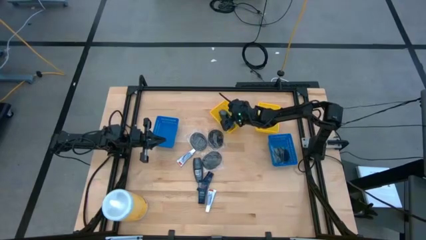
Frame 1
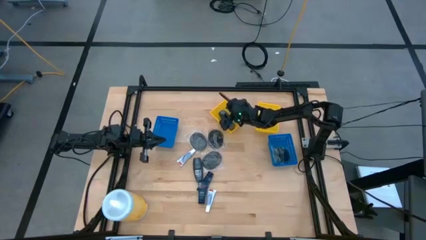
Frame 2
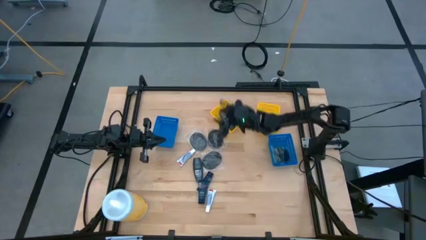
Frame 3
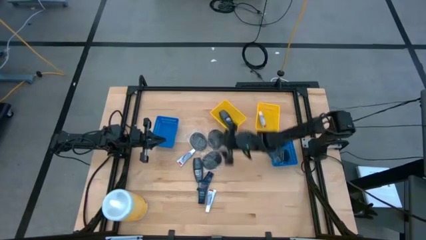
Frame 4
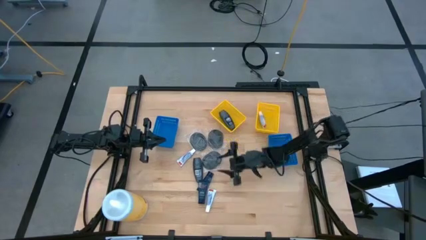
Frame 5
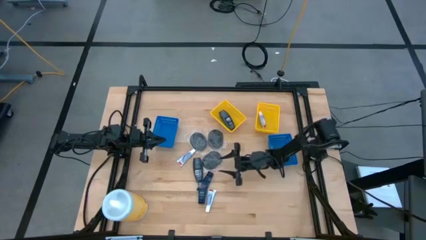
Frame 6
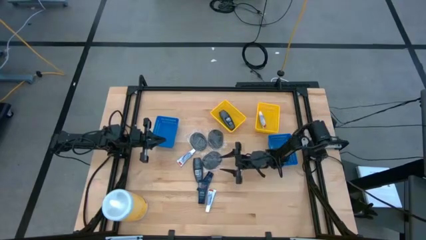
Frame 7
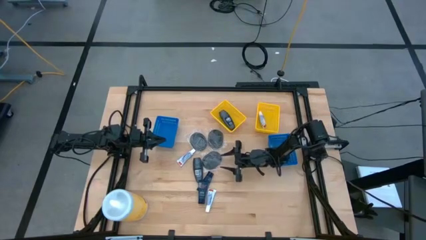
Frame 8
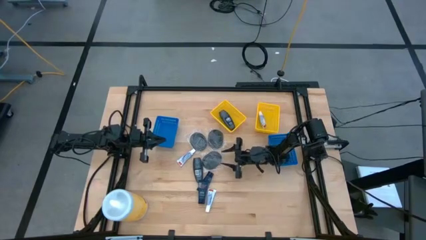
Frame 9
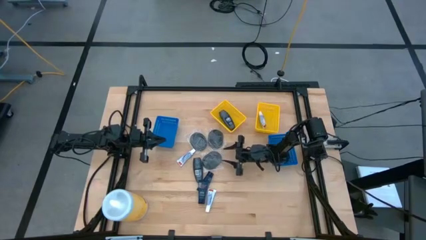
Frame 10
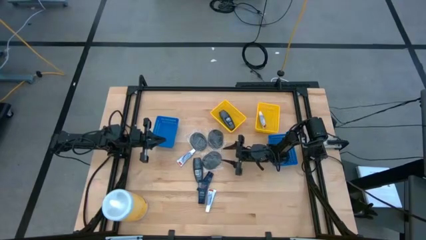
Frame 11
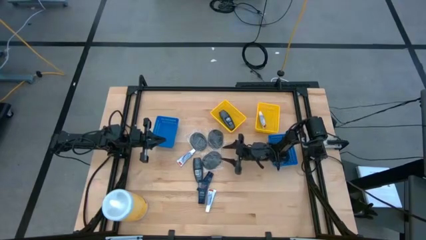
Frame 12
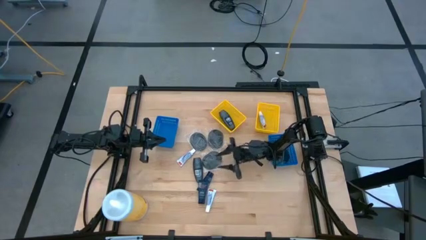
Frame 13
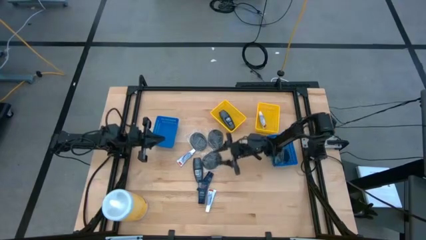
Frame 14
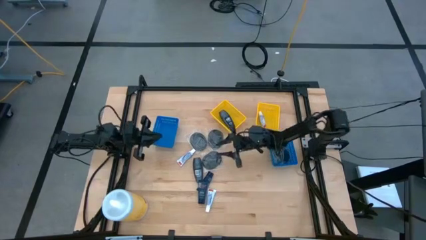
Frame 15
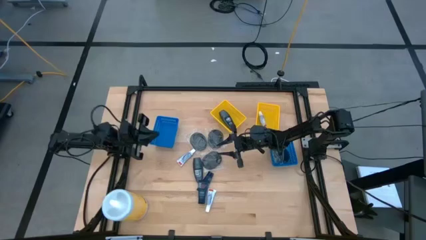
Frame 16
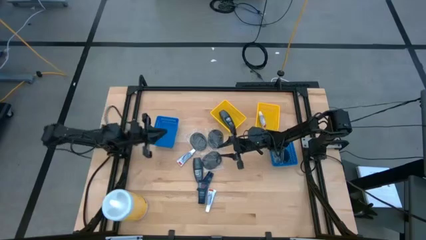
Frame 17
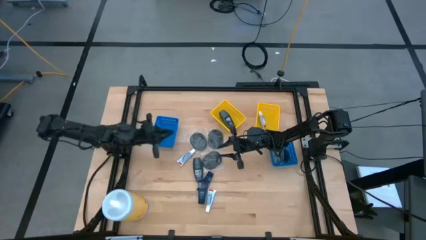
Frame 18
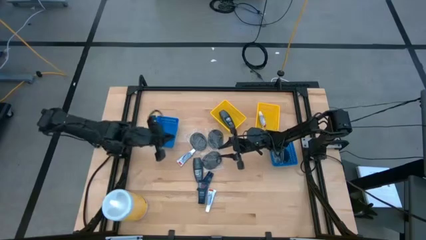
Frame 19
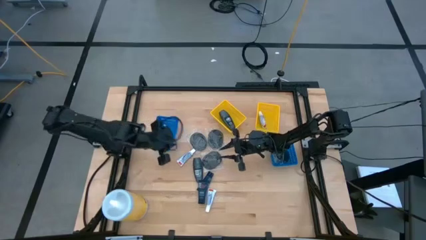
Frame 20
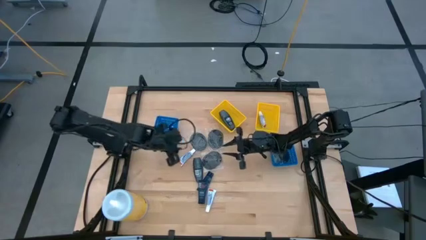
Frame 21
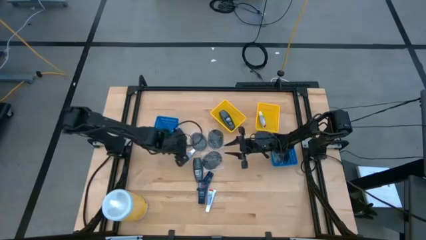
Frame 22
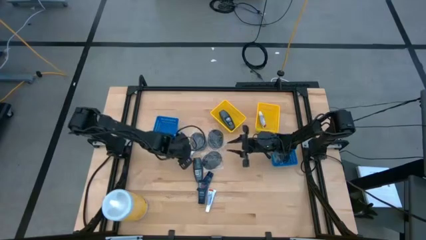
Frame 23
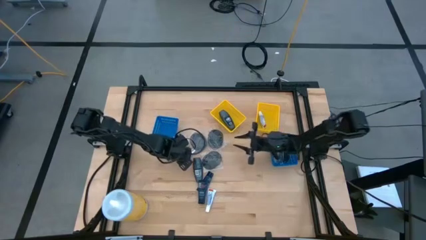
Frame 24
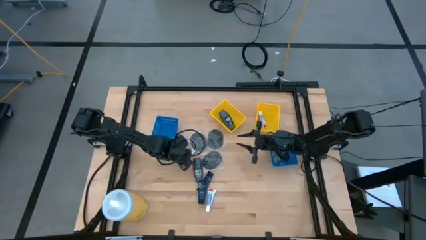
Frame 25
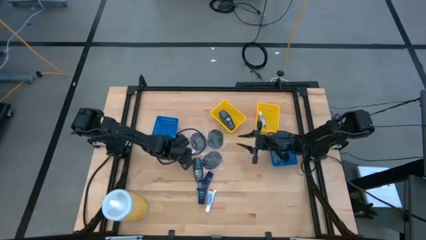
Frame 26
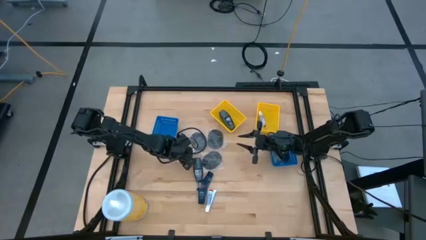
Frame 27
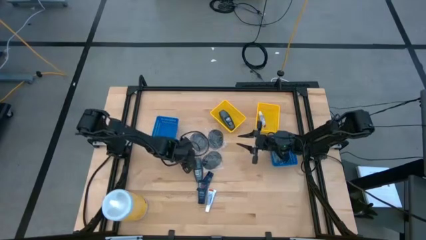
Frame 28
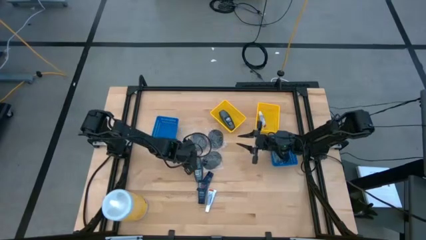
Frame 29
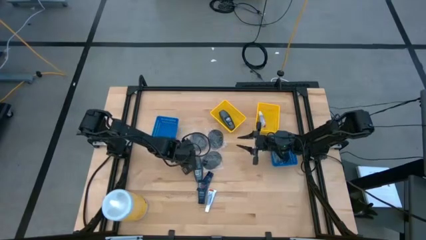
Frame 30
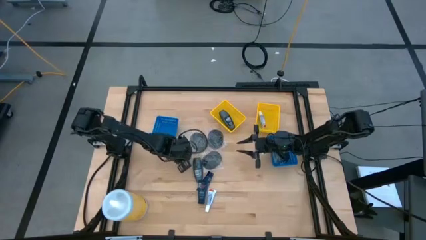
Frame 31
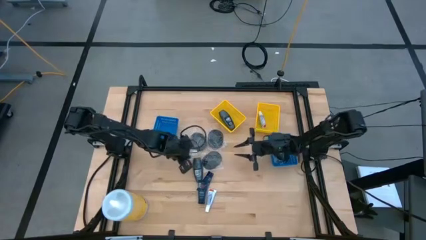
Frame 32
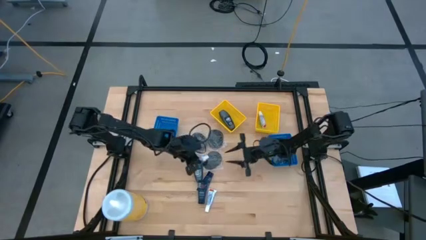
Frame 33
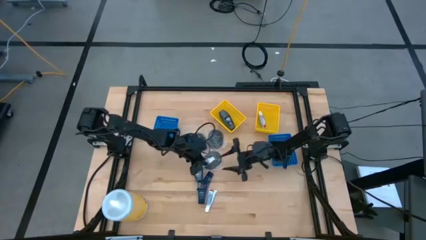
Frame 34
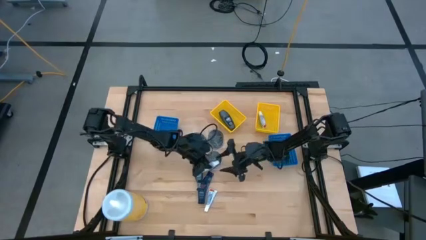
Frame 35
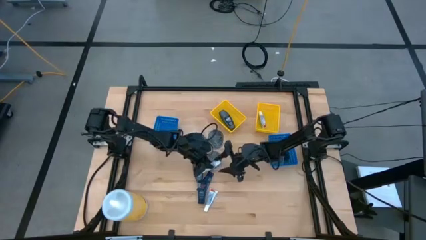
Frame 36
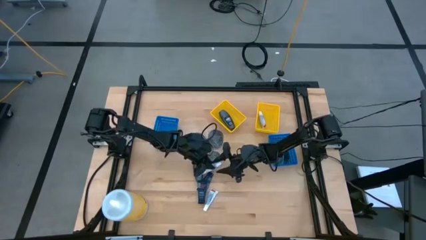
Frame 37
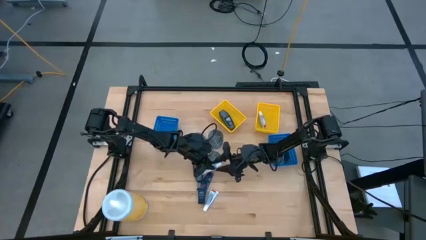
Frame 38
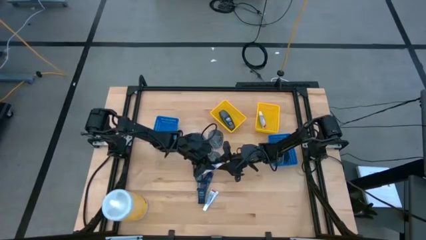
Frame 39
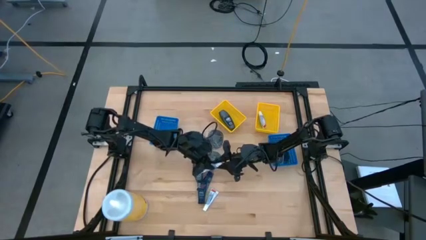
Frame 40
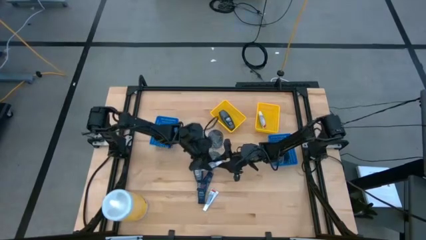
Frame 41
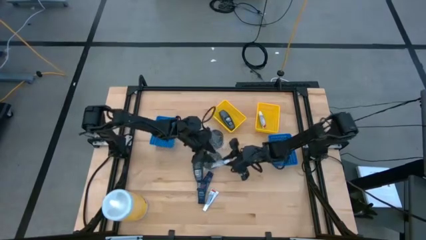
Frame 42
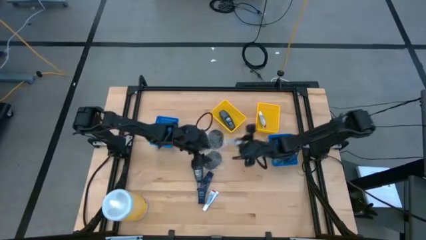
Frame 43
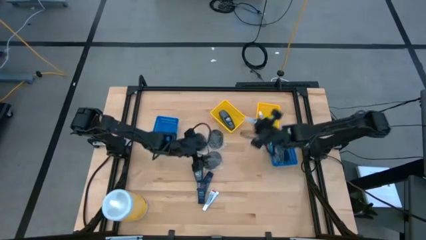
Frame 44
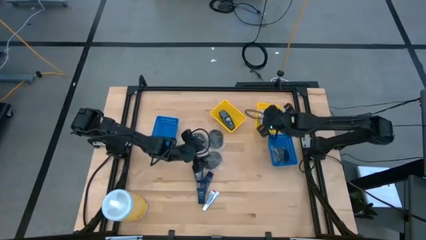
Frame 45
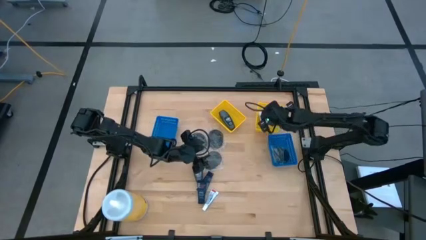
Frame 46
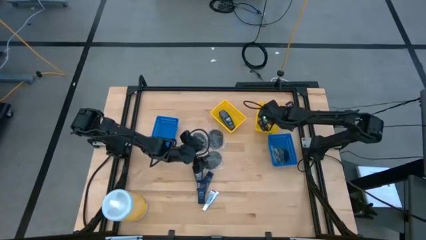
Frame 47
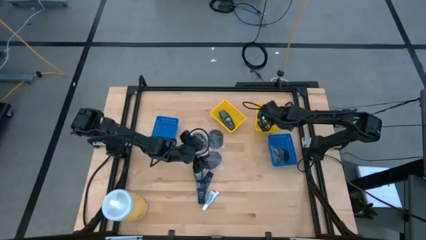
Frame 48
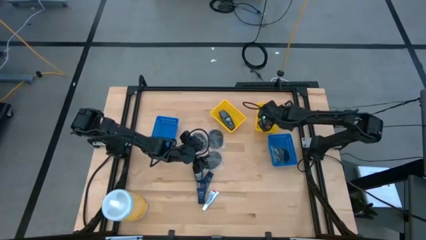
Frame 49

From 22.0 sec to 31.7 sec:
Task: Pick & Place Travel size toiletries
Put the top white toothpaste into the right yellow bin

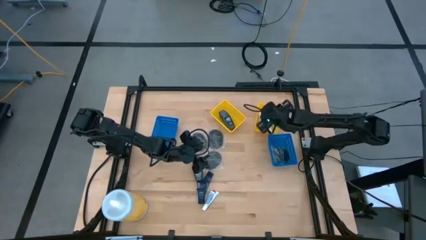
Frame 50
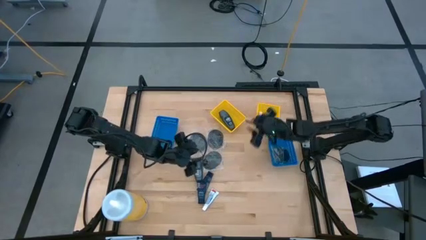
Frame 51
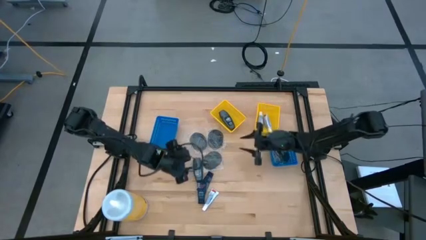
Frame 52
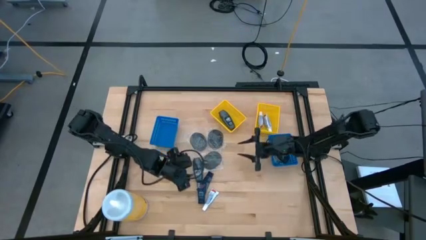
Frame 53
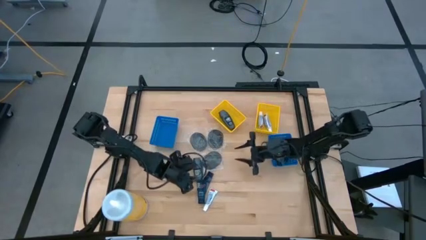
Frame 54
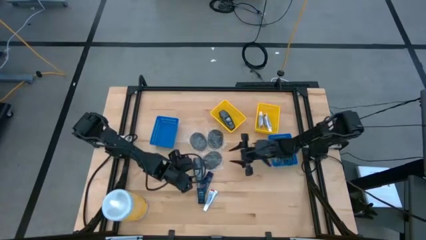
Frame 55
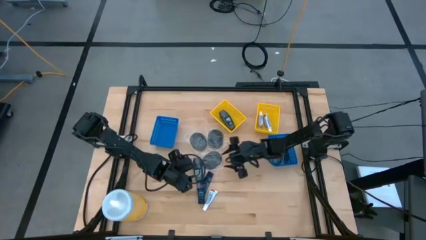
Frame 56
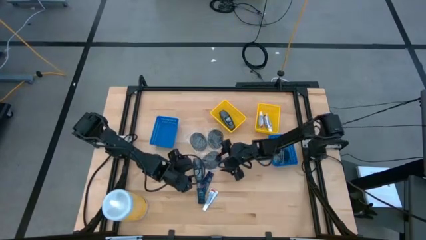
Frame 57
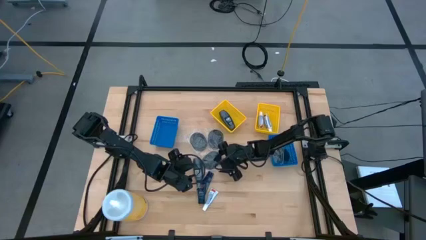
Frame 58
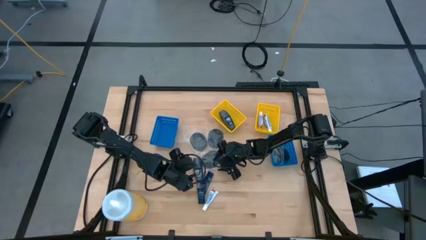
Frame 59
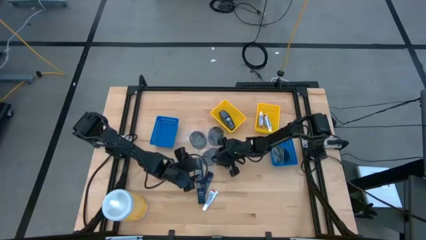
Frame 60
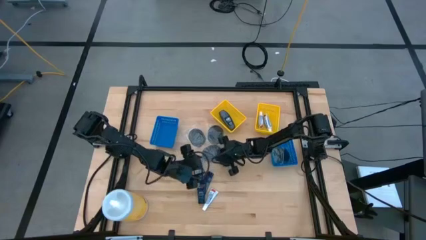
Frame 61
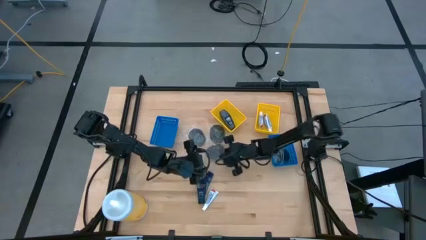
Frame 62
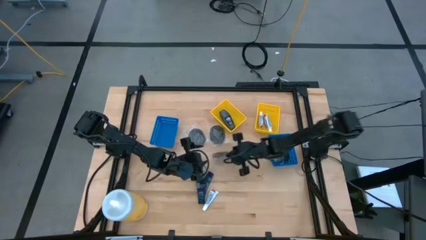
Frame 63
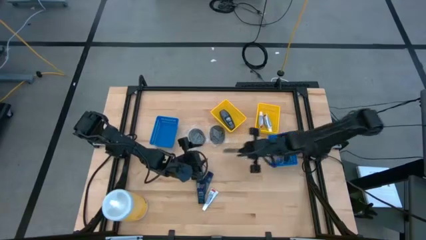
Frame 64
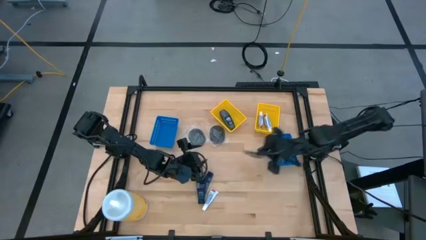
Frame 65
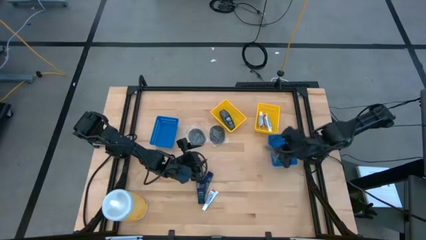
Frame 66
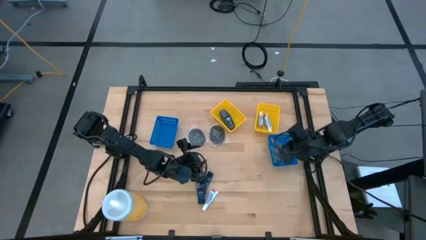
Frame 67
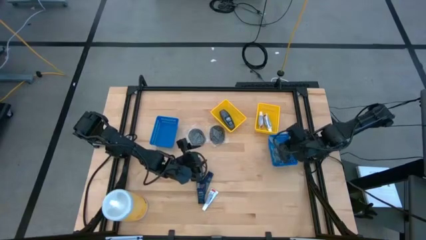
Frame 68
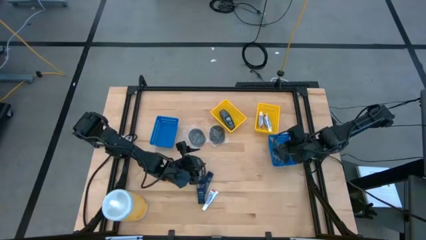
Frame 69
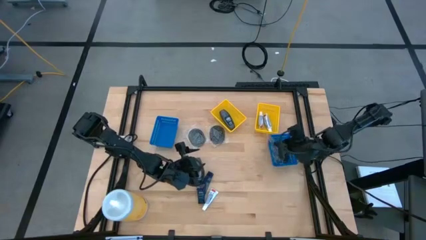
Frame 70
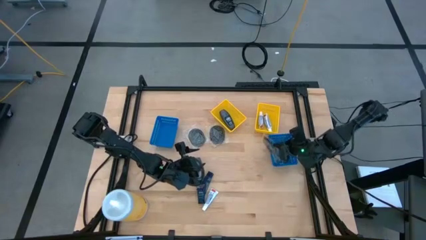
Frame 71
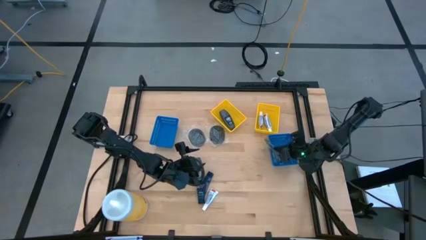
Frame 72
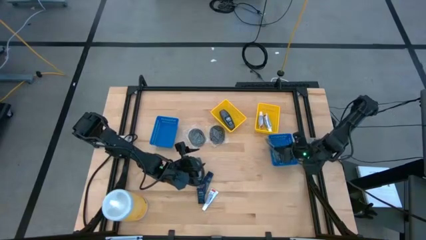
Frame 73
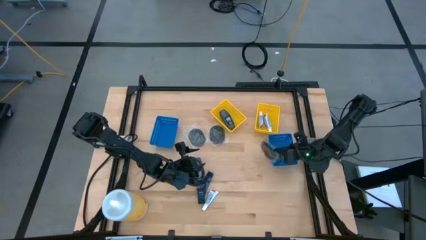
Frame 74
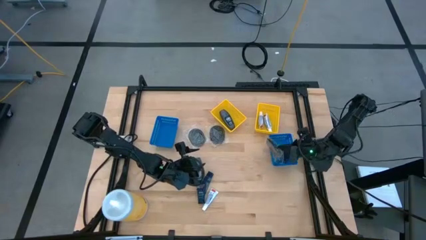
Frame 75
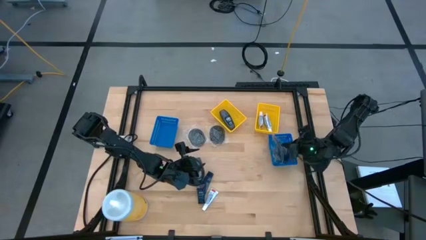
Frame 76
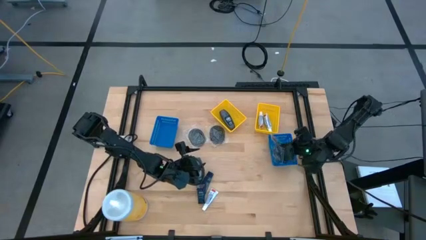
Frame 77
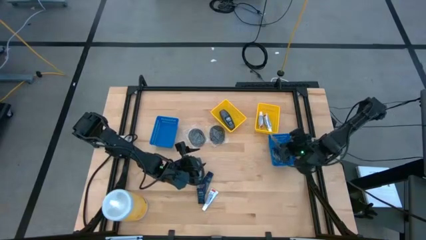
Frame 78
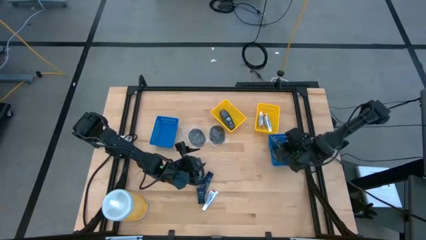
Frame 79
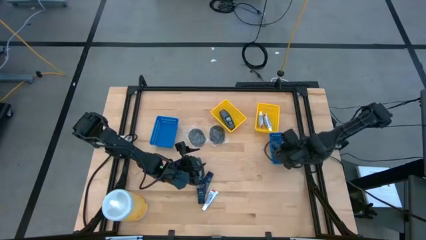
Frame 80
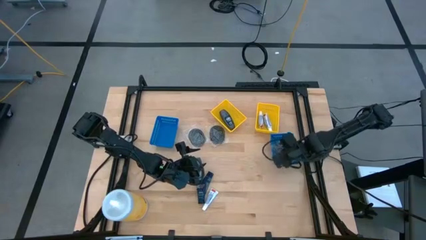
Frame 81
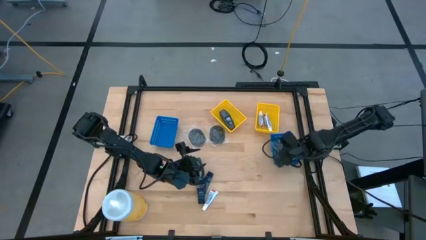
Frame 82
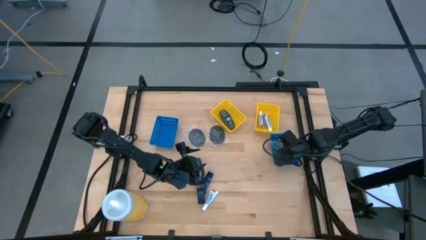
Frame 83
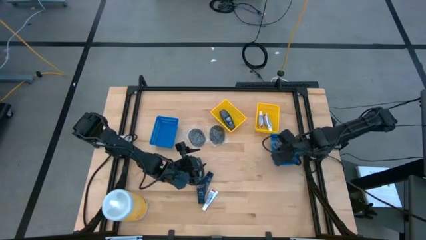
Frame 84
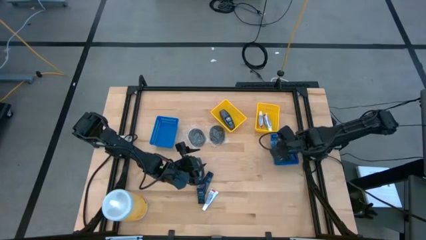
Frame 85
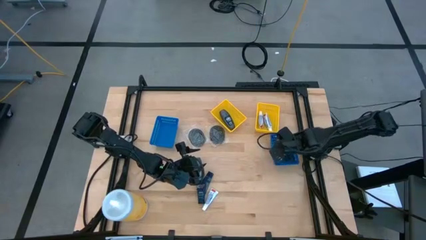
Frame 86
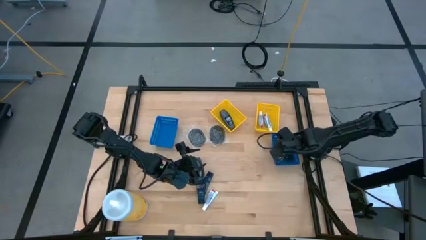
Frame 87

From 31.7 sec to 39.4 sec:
Put the bottom black hairbrush into the right blue bin
